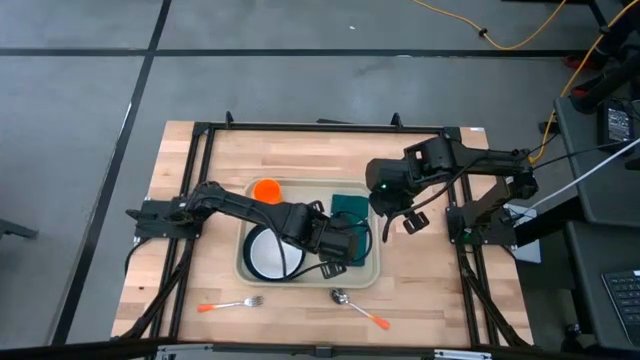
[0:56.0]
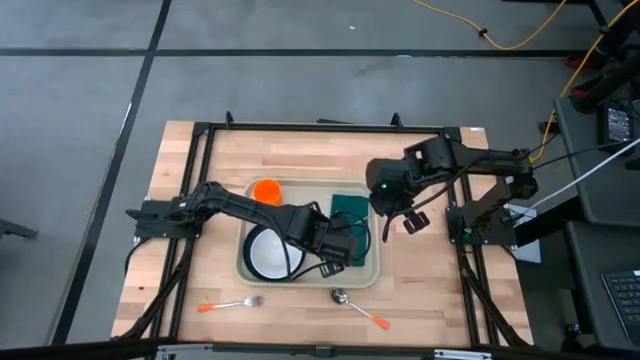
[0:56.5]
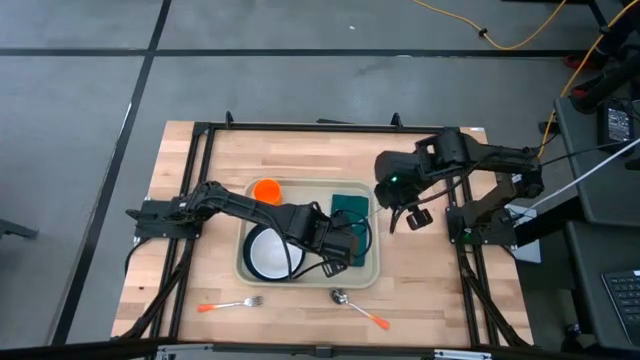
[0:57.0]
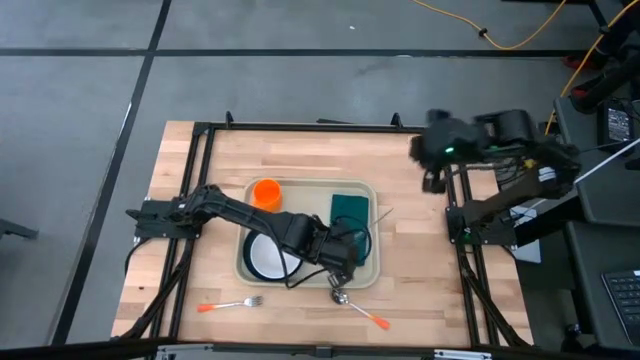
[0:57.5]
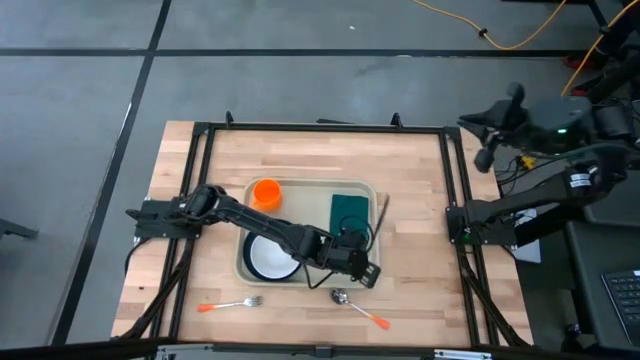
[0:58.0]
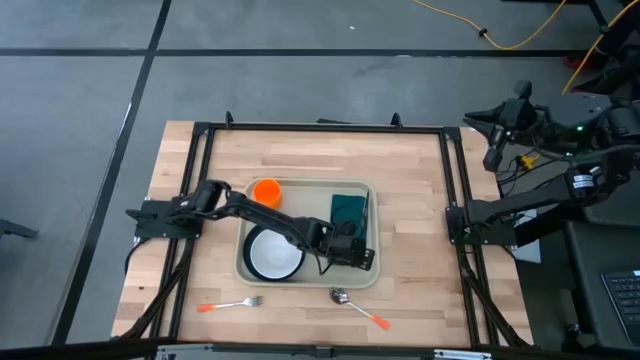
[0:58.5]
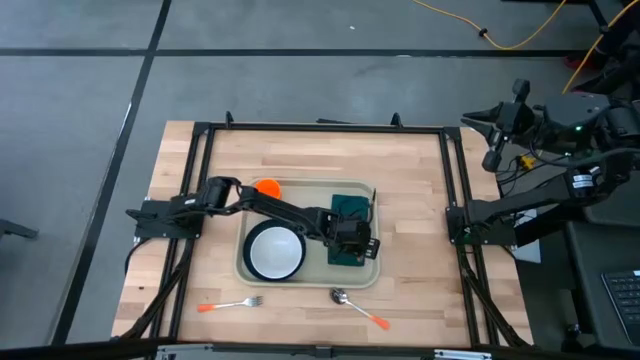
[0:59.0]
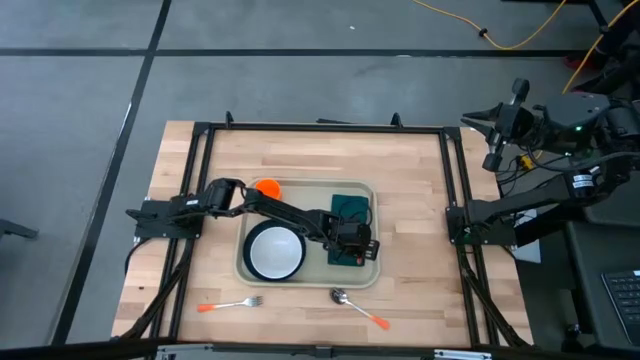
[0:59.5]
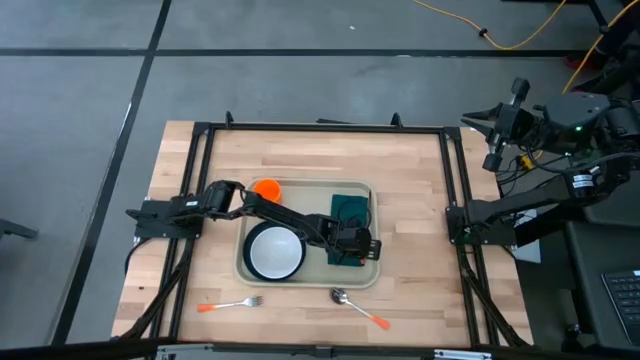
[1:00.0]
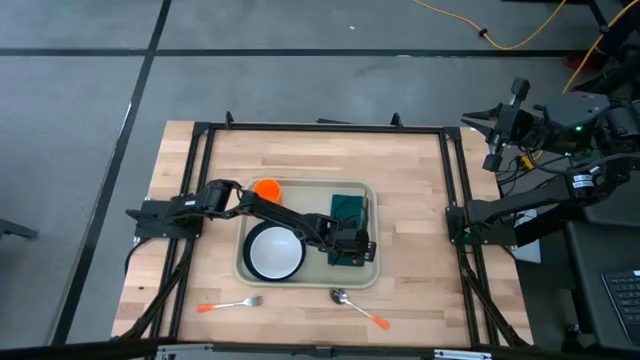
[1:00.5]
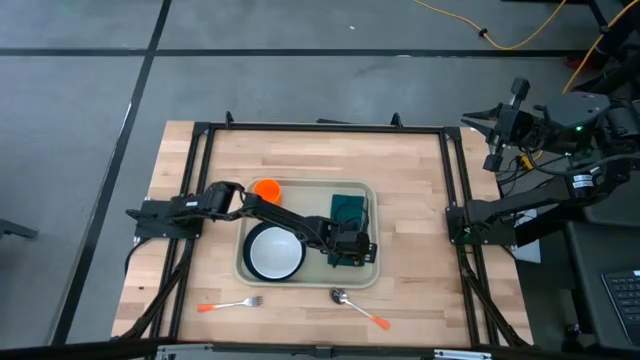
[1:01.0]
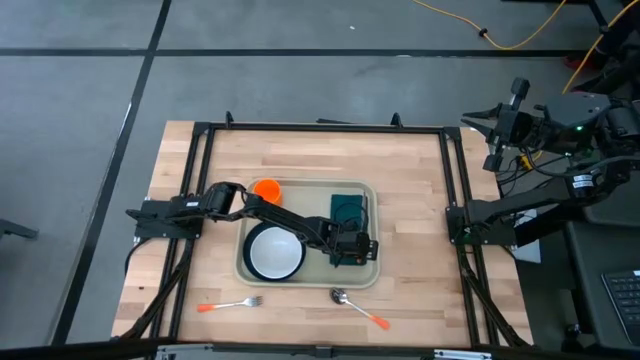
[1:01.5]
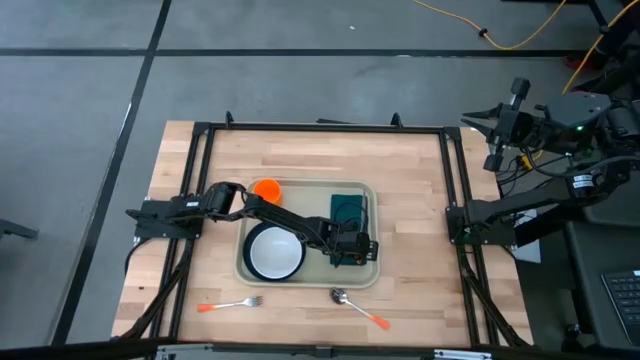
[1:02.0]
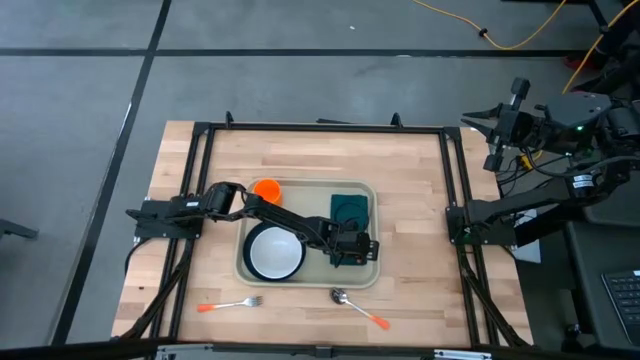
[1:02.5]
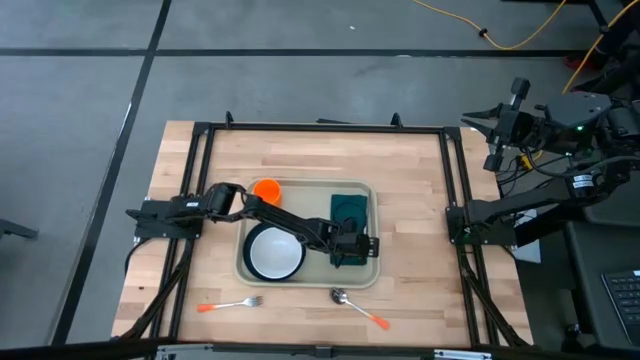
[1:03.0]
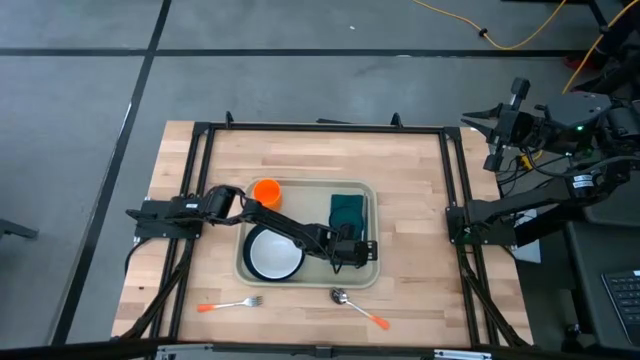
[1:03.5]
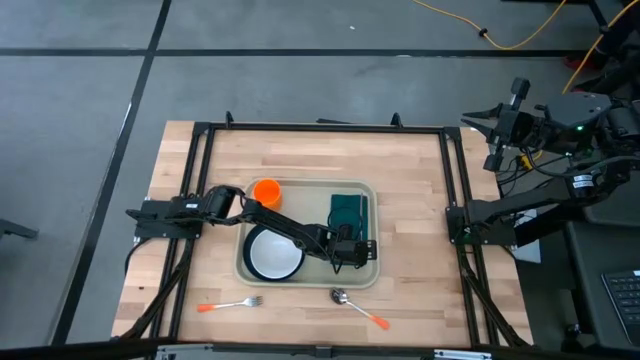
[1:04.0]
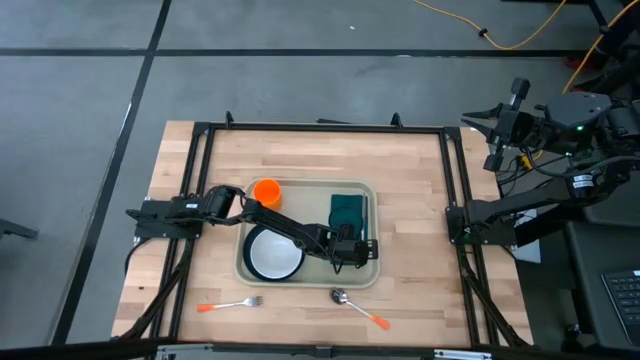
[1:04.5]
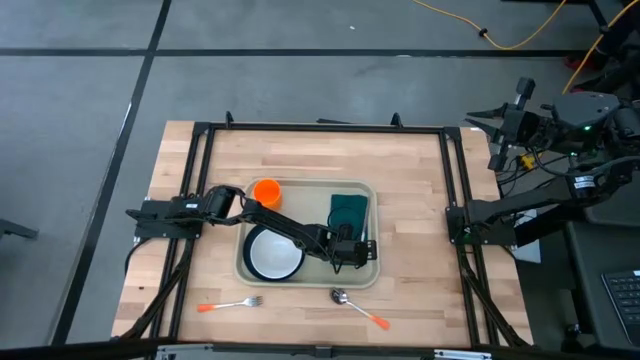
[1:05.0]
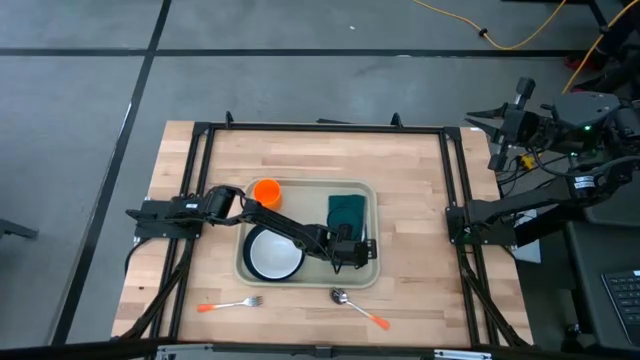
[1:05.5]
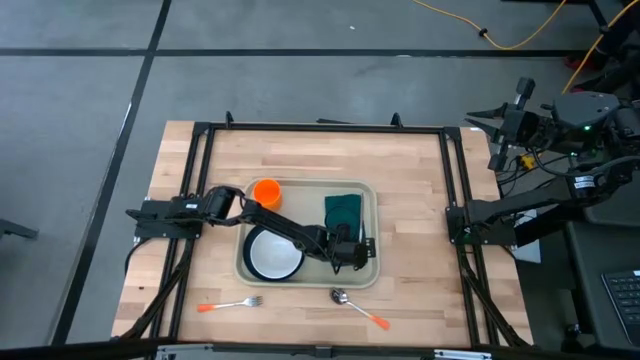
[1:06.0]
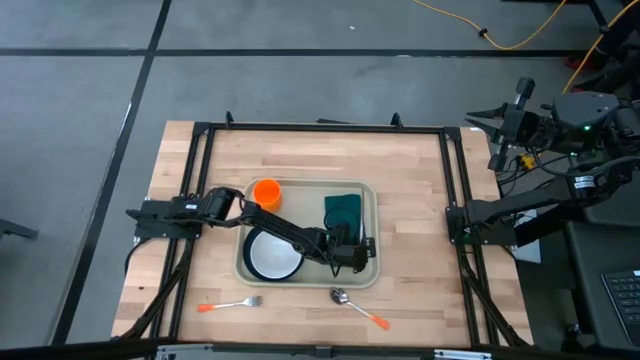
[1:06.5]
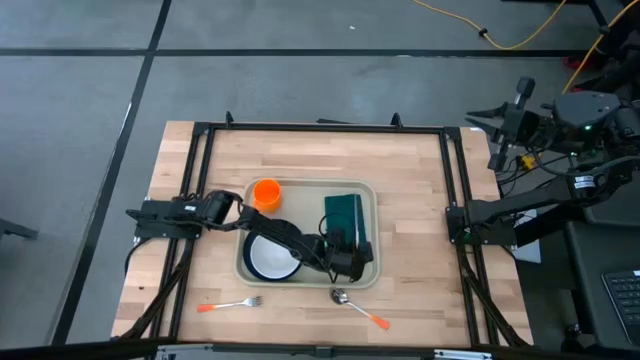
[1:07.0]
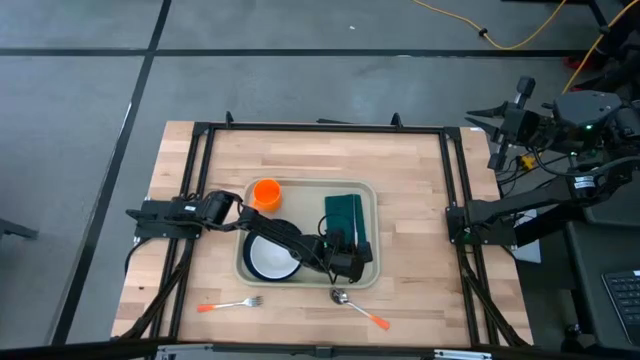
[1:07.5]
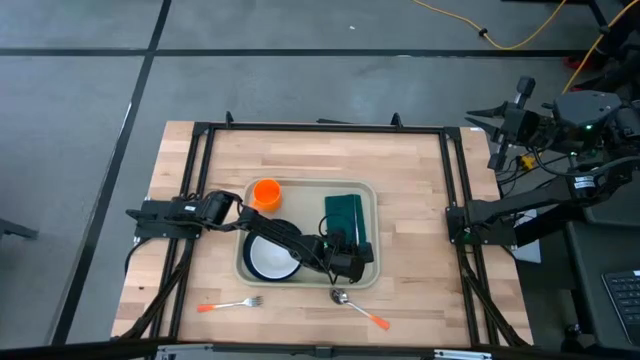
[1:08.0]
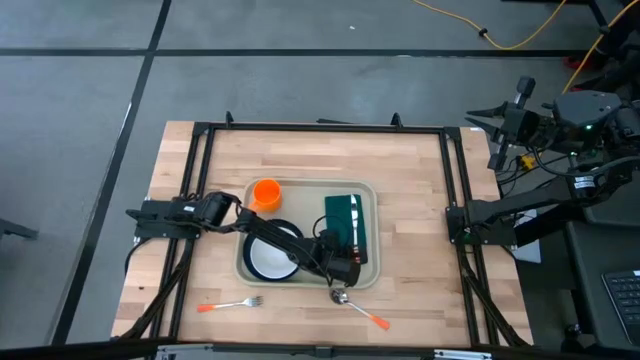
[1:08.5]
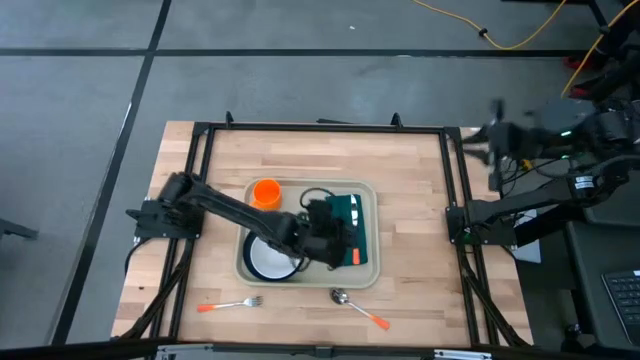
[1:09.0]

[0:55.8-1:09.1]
Task: Set up tray
Put the orange knife on the dark green napkin

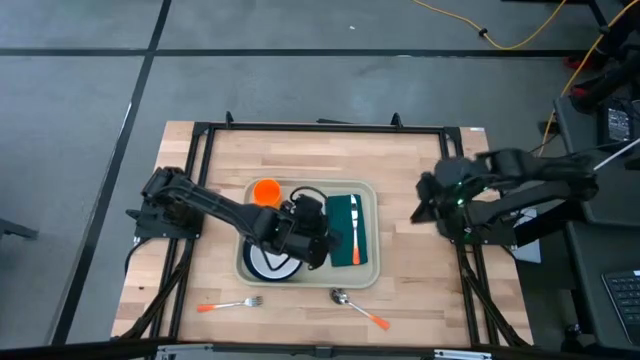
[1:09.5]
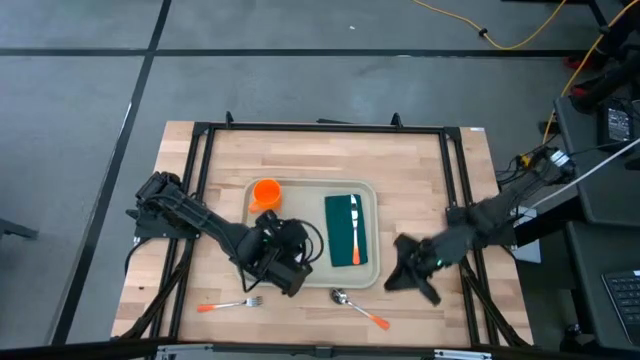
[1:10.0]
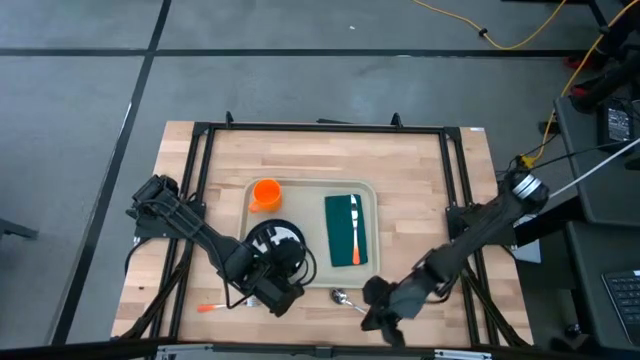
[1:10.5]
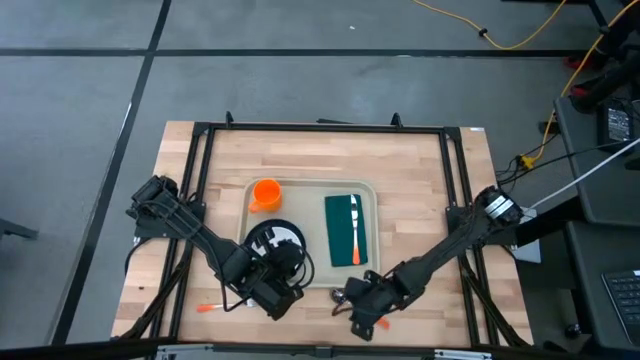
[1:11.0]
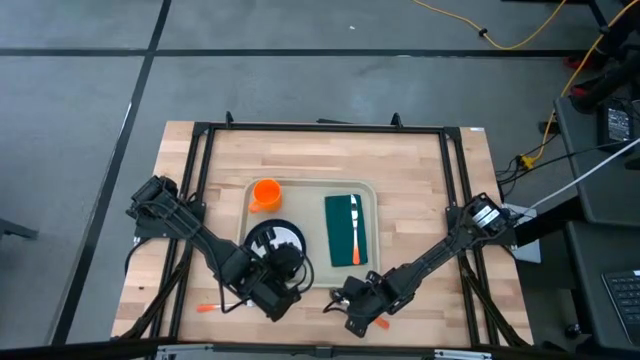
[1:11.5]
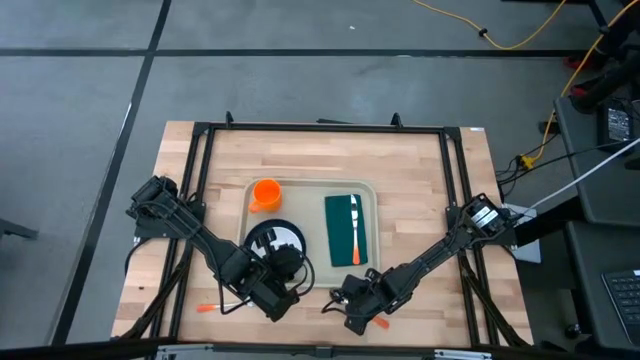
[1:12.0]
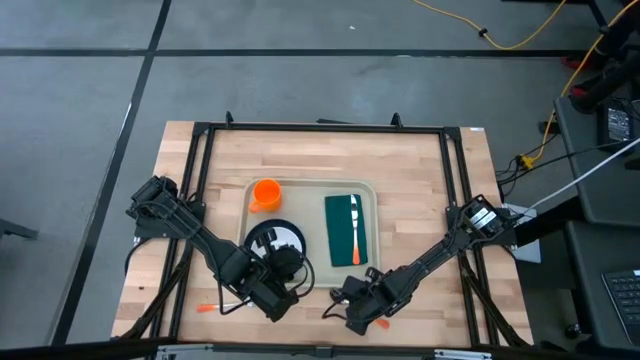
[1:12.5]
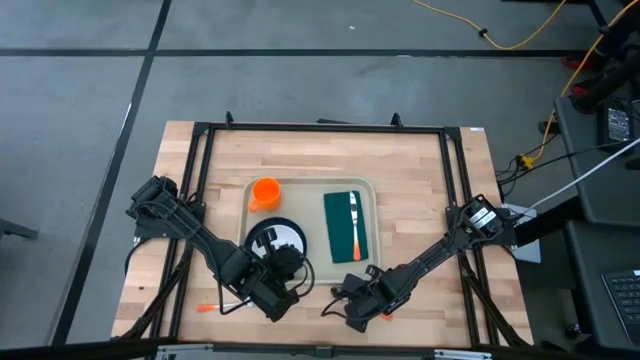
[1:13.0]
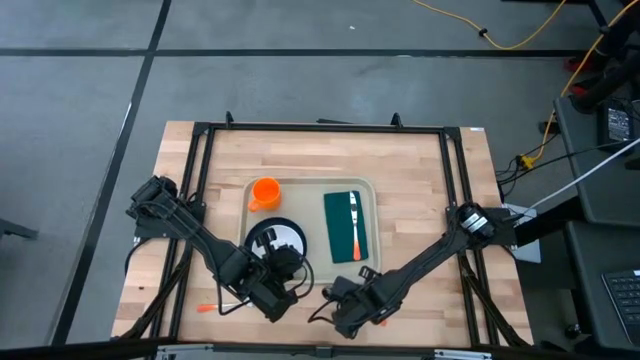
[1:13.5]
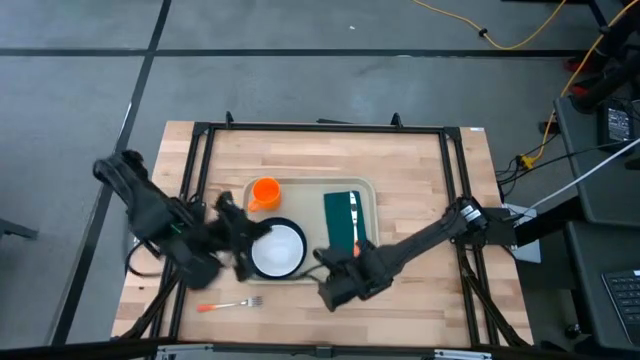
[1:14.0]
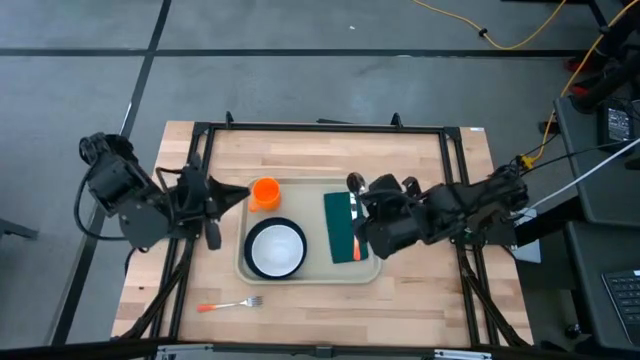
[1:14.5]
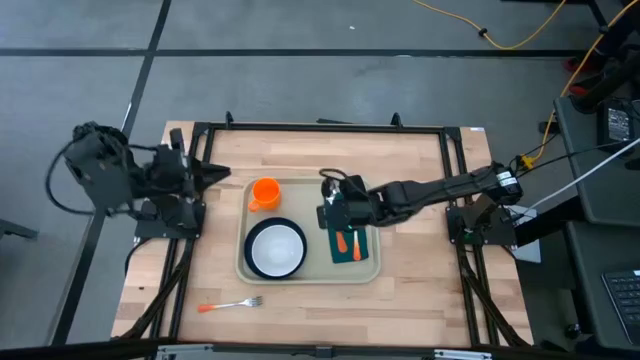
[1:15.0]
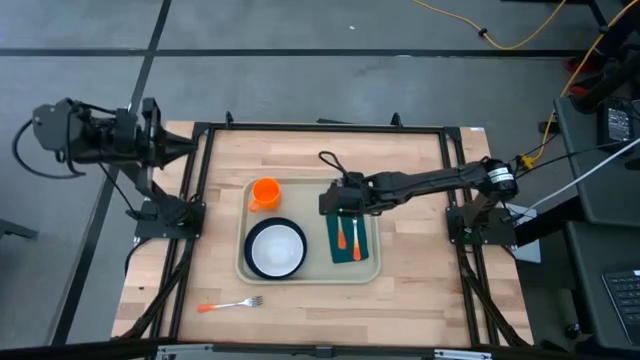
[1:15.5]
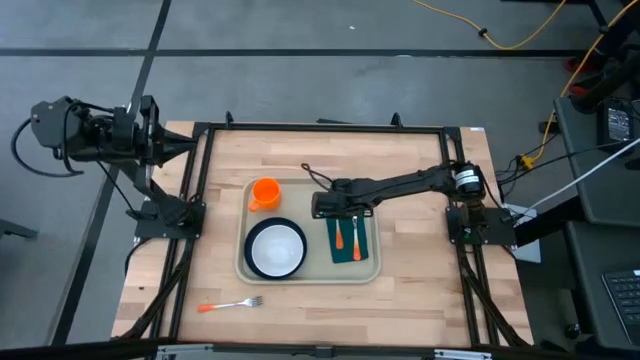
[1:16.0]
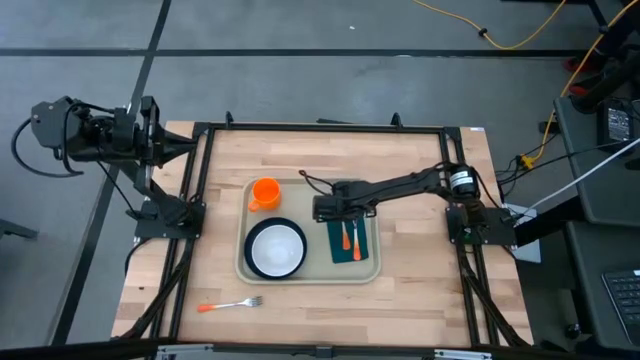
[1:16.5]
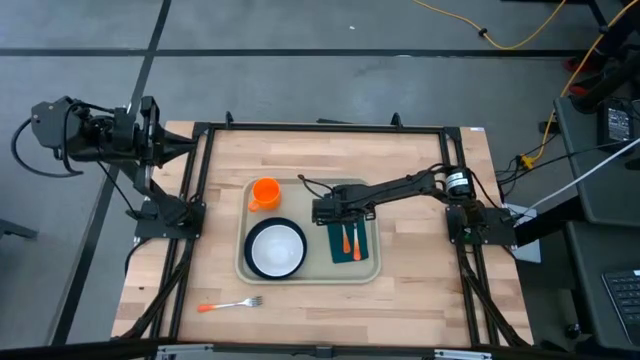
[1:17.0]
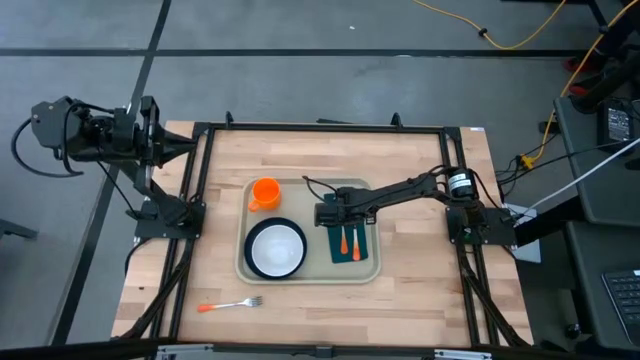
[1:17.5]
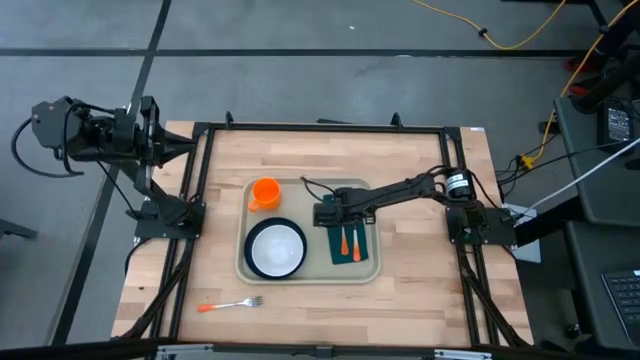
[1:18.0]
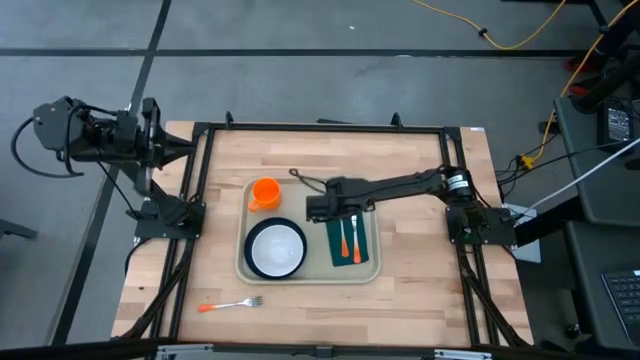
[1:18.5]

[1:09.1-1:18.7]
Put the orange spoon on the dark green napkin
